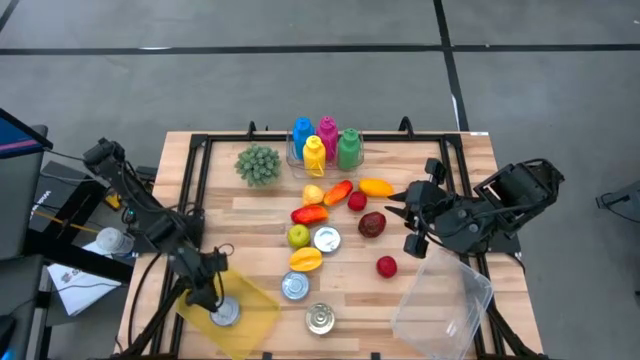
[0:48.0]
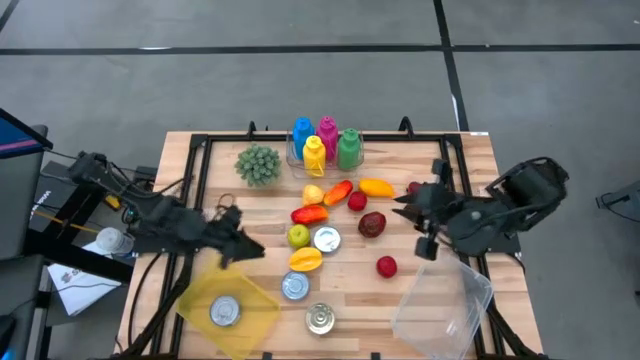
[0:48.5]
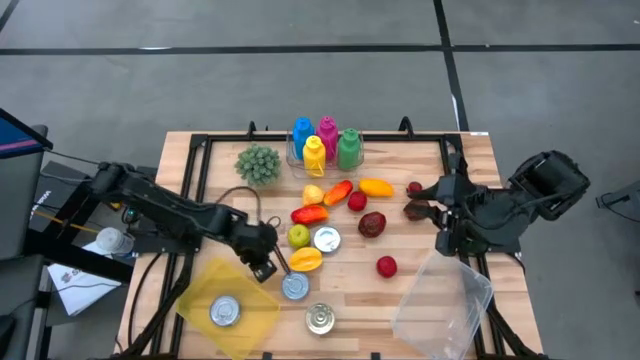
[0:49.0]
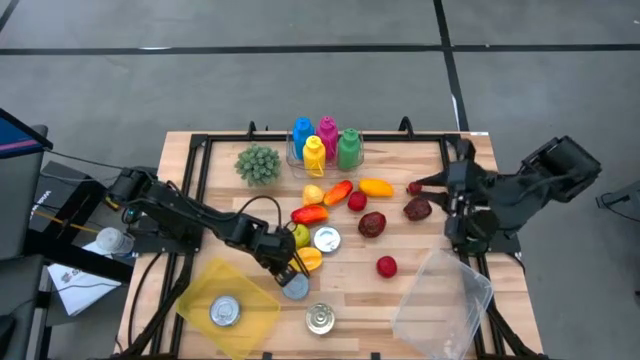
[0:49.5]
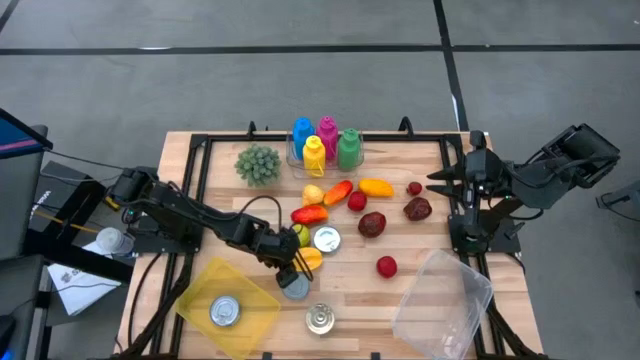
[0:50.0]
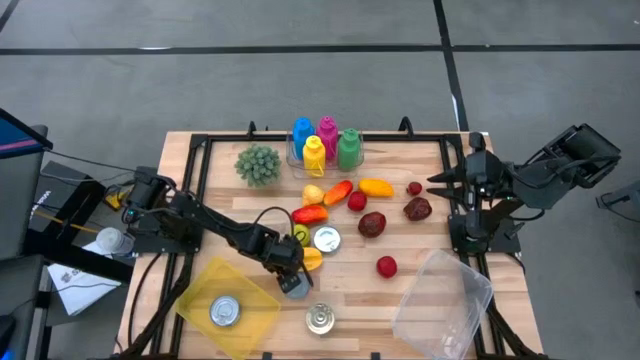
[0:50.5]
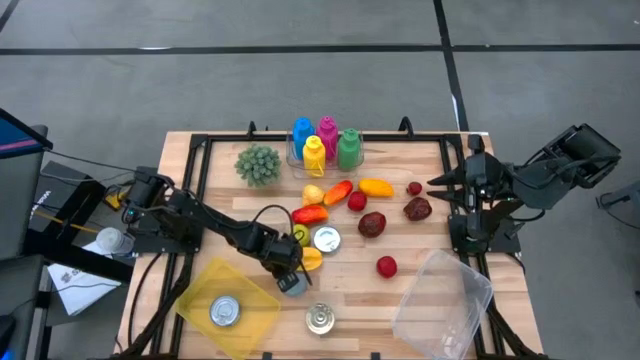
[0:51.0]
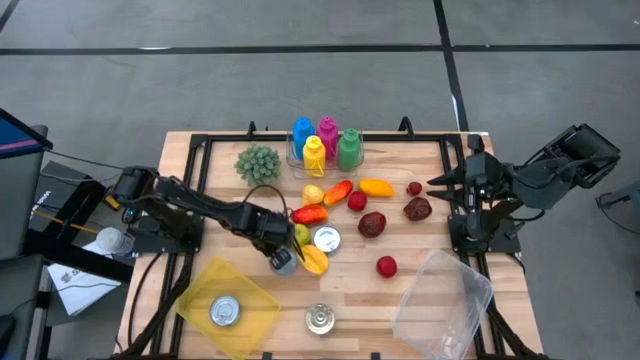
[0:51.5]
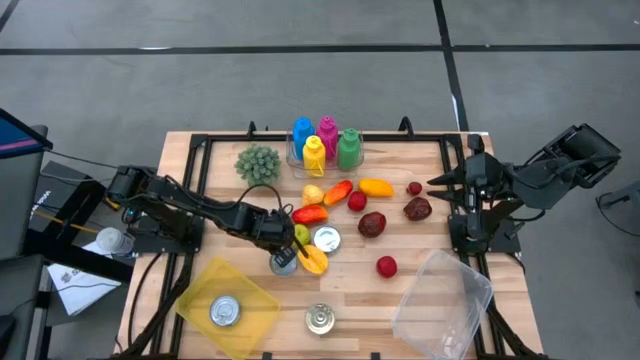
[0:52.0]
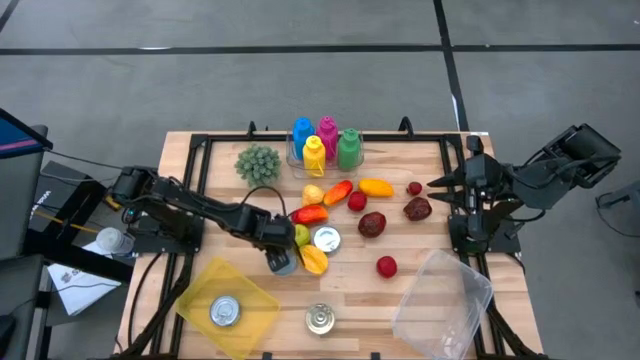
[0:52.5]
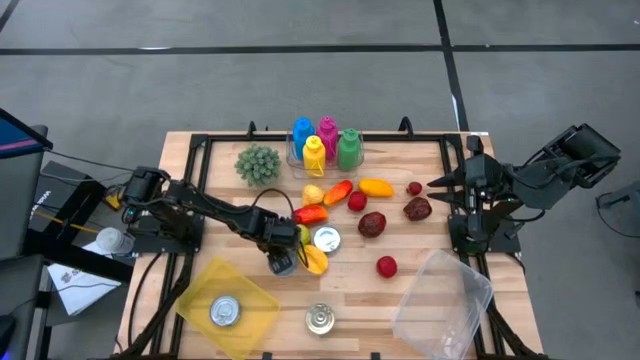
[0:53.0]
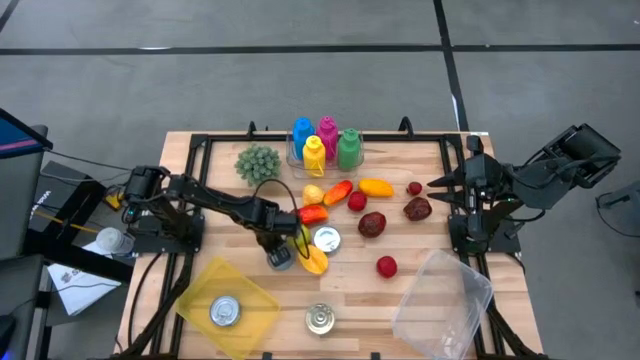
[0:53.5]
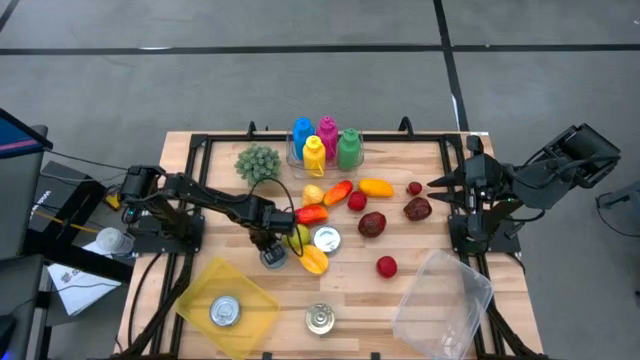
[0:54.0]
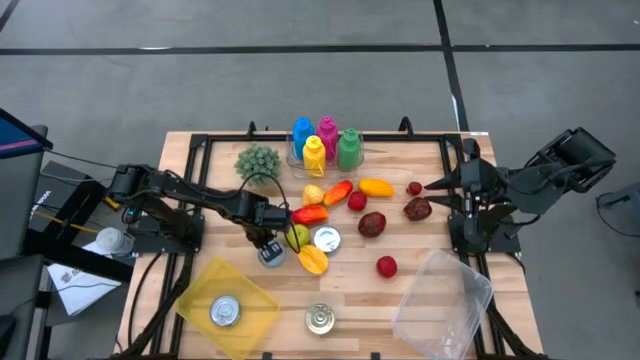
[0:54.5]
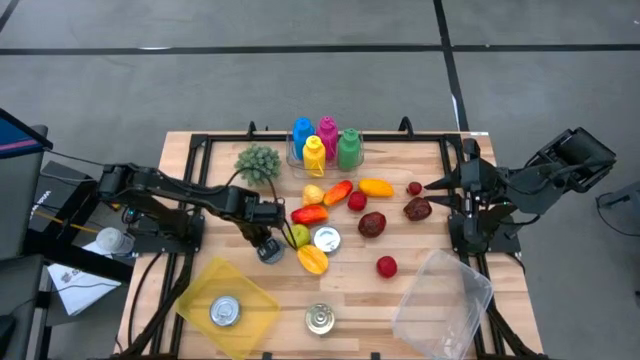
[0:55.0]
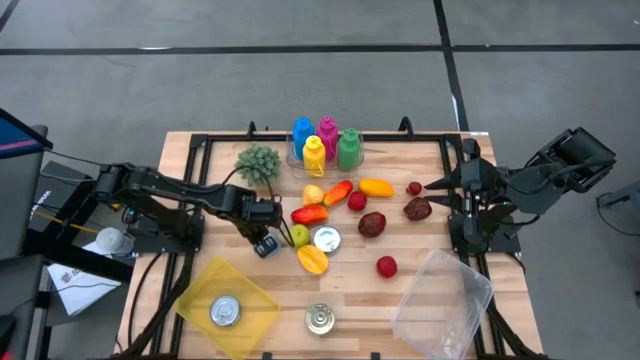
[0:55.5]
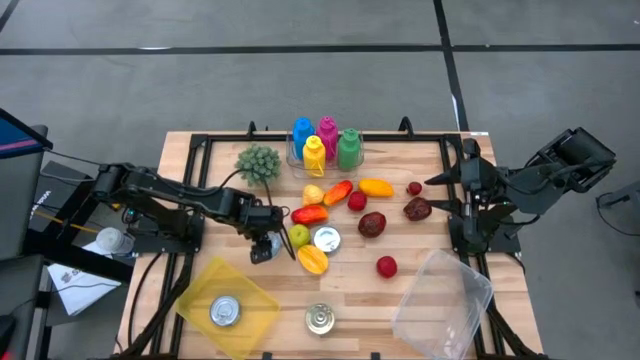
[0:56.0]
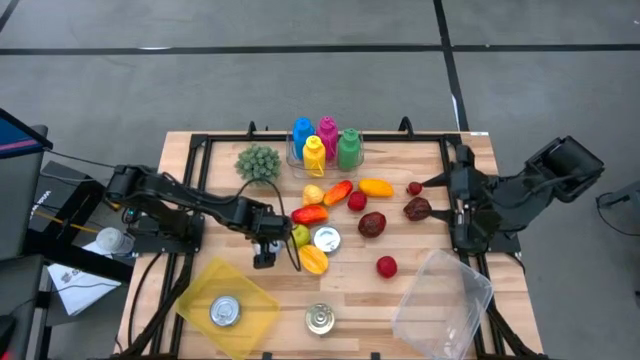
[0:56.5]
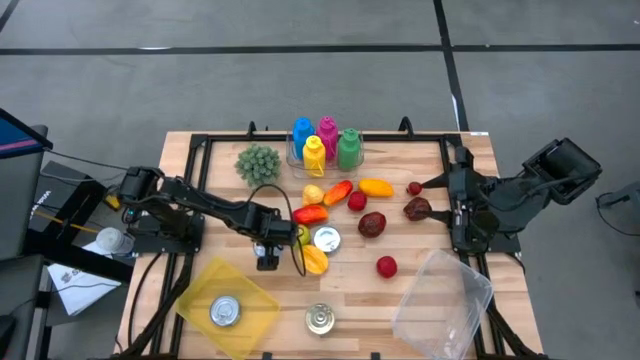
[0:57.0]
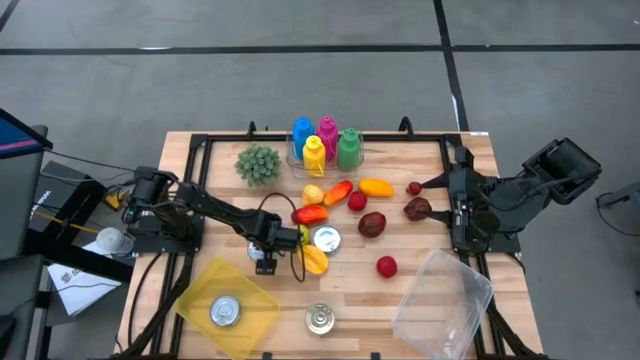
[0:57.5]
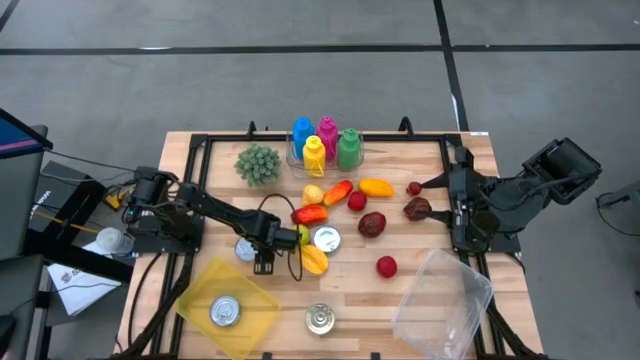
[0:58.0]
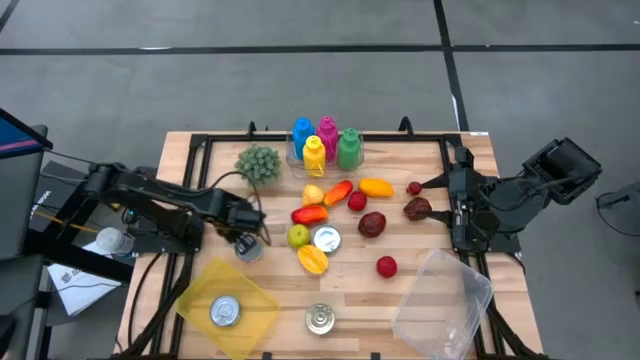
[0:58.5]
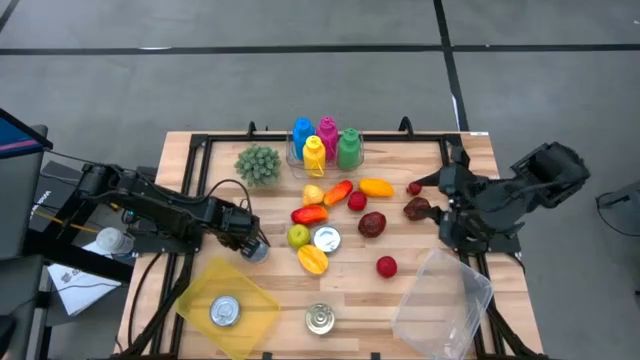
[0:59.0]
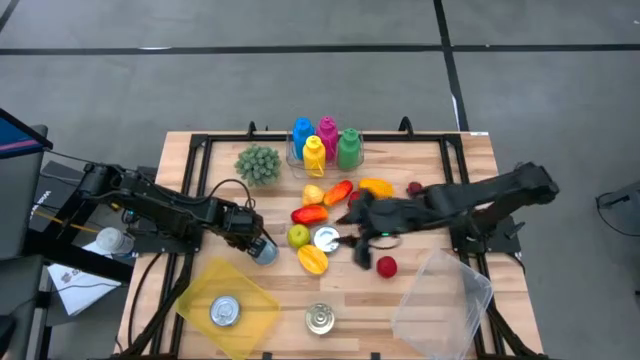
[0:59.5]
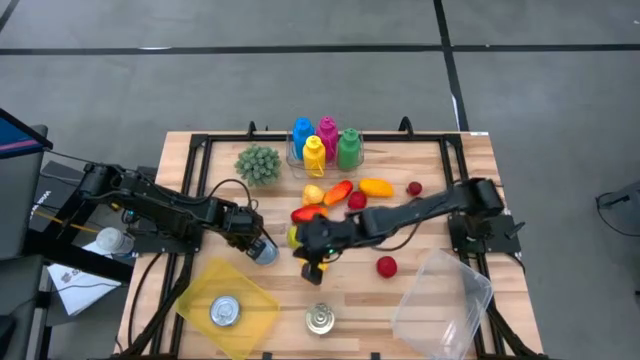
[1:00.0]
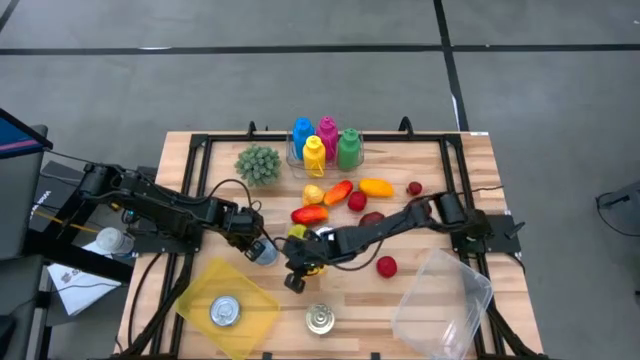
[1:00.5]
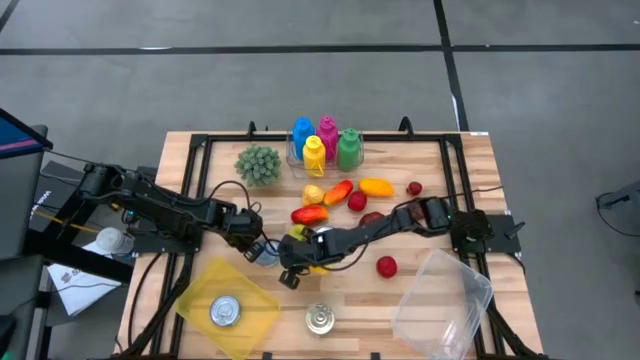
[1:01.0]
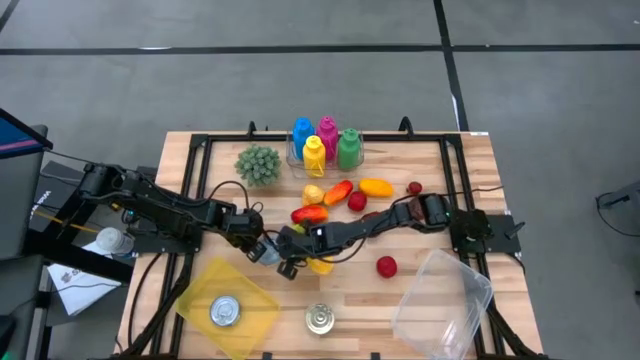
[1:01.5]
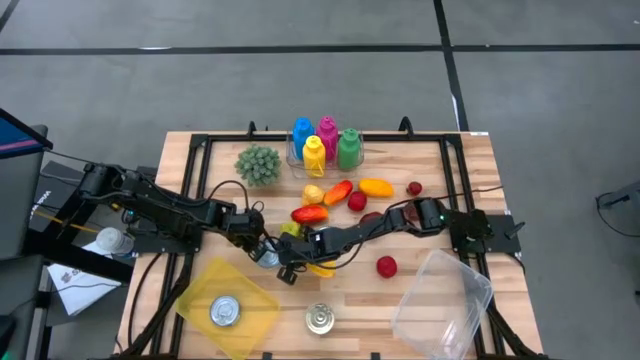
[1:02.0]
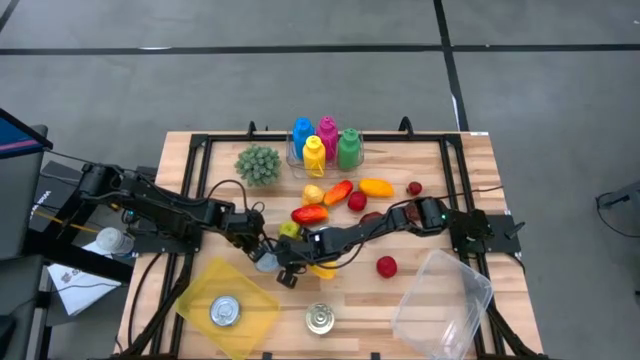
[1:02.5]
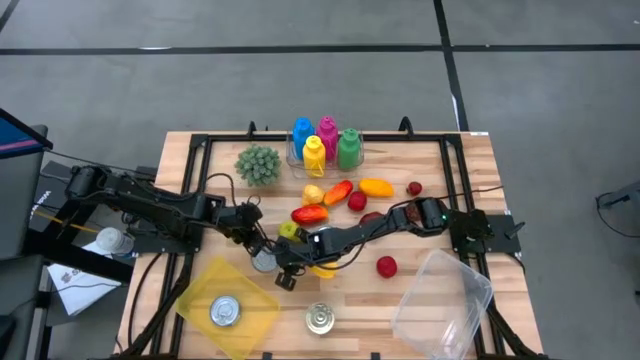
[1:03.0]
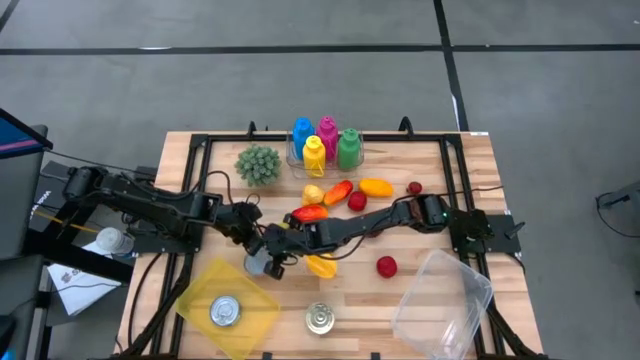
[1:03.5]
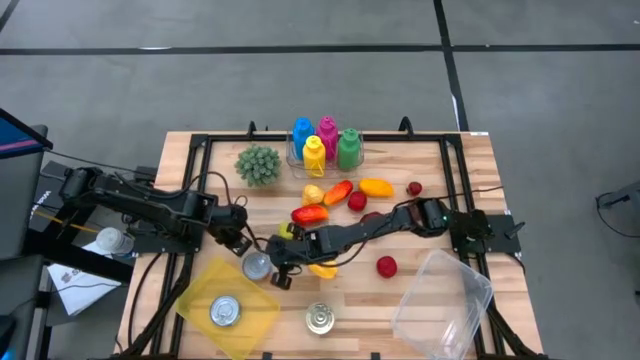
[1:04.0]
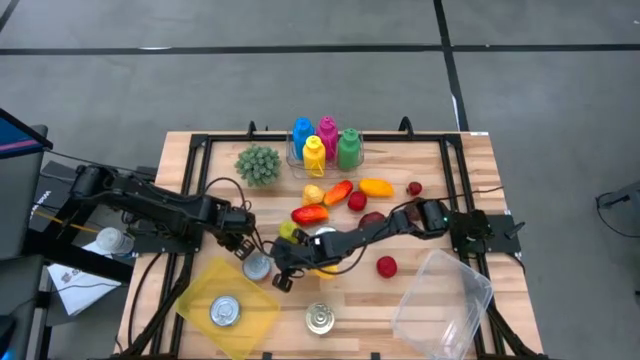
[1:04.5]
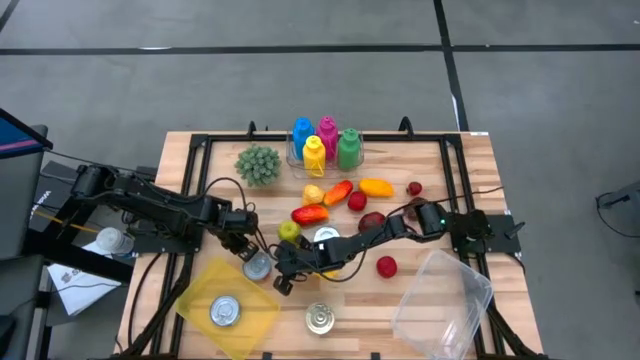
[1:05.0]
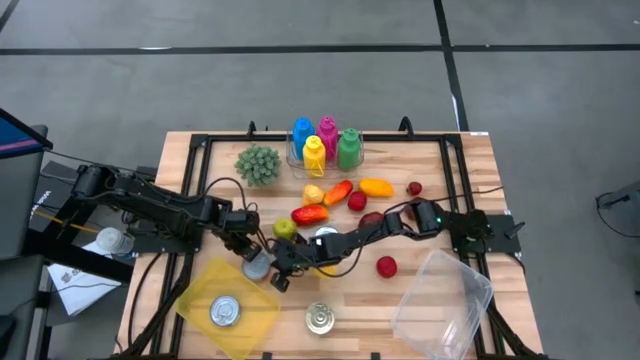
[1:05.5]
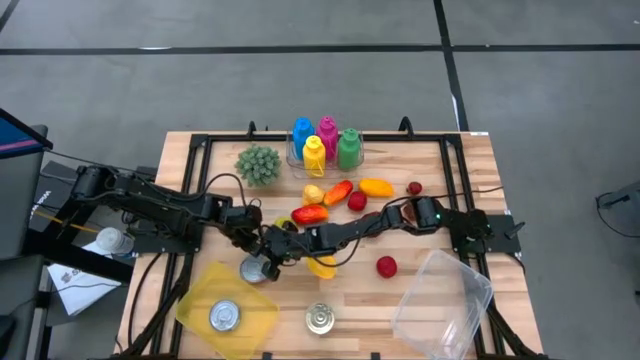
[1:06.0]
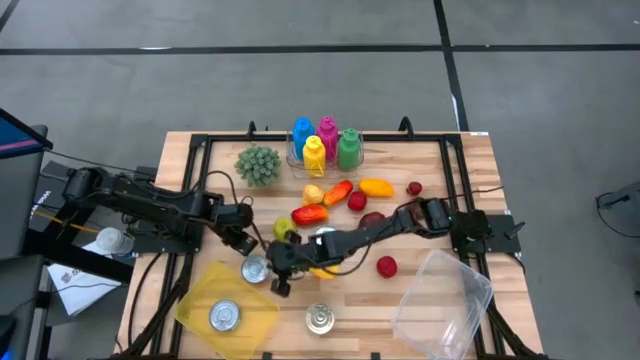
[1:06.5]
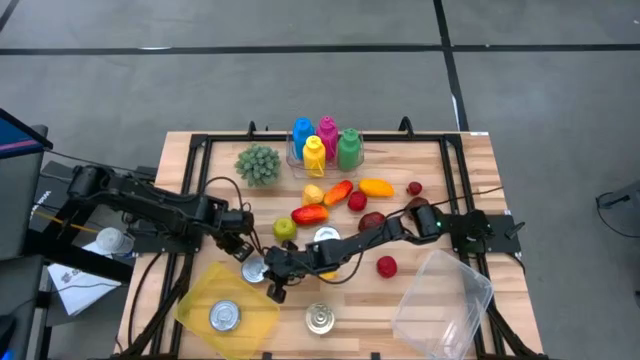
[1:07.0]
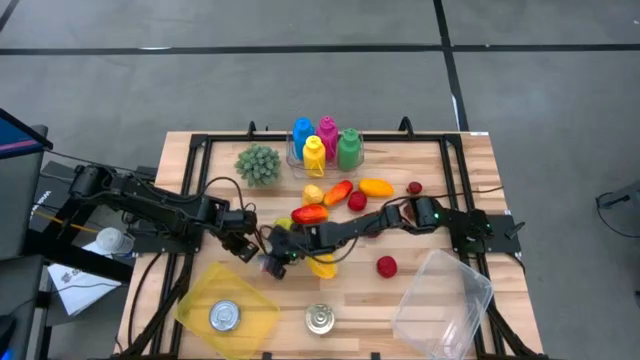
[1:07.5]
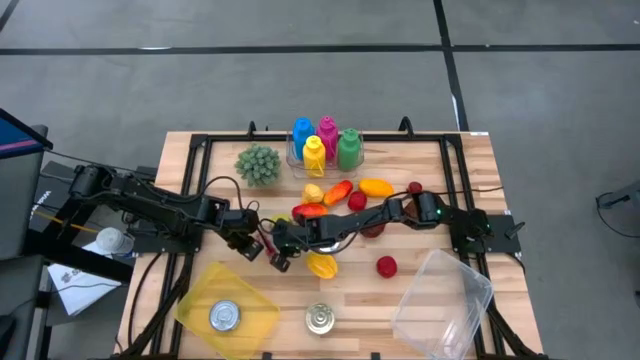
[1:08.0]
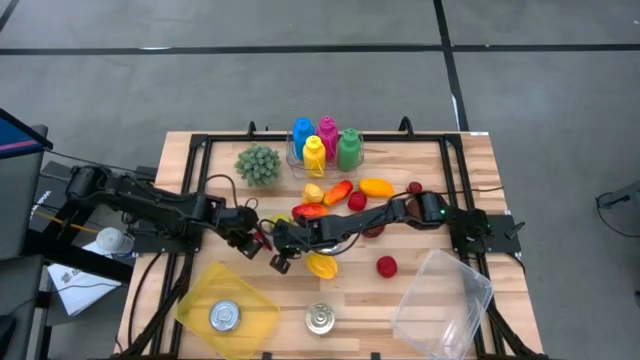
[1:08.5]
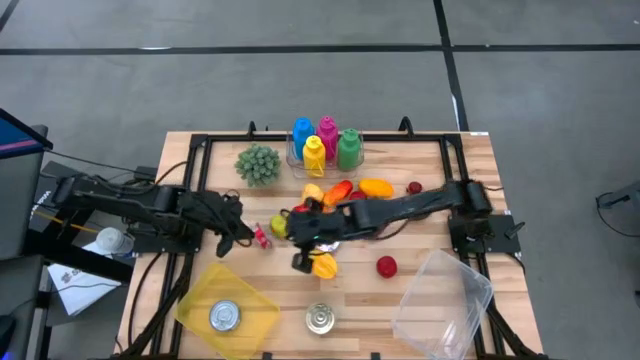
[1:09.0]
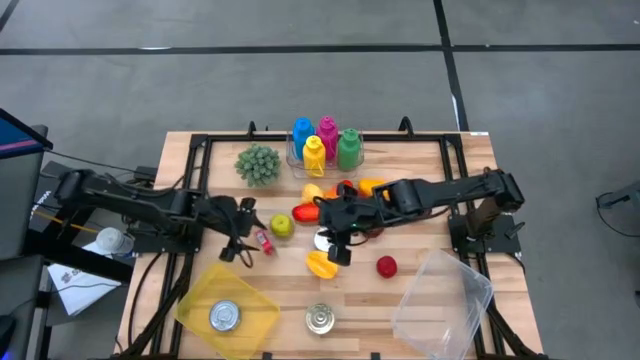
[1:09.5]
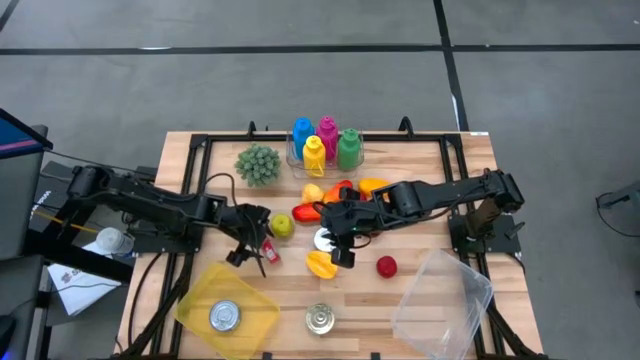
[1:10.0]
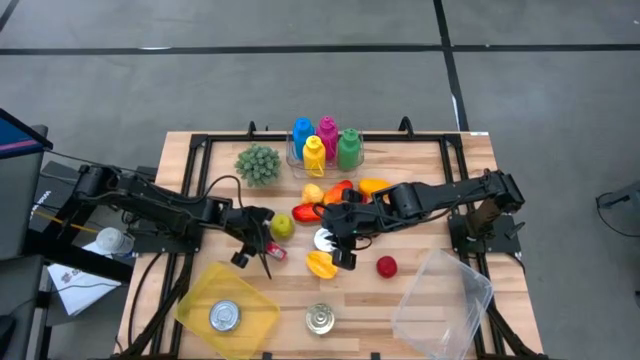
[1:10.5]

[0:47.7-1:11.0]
Task: Pick & Place Food Item
Put the red tuna can into the yellow bin
